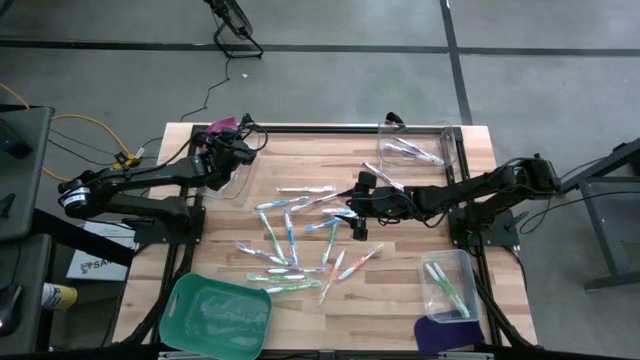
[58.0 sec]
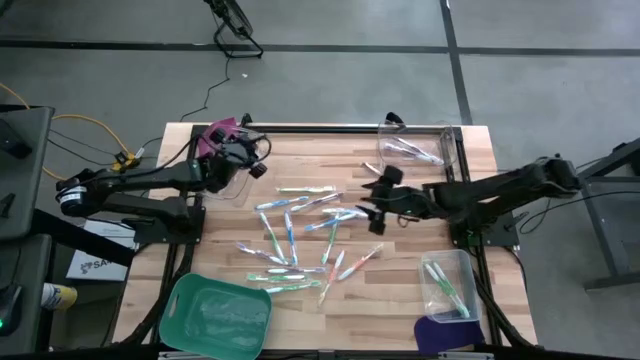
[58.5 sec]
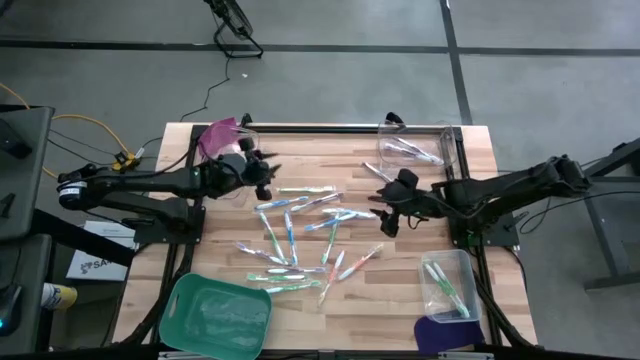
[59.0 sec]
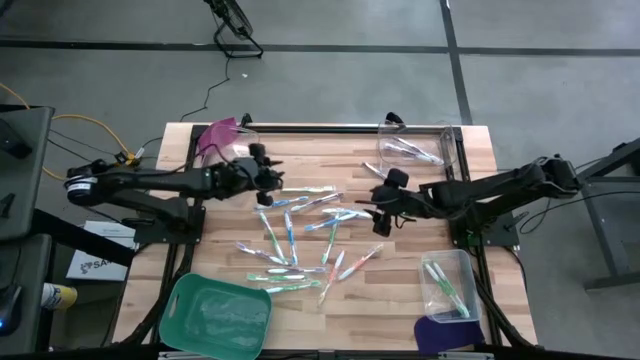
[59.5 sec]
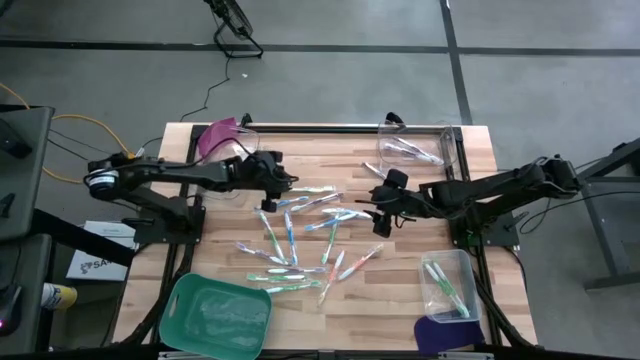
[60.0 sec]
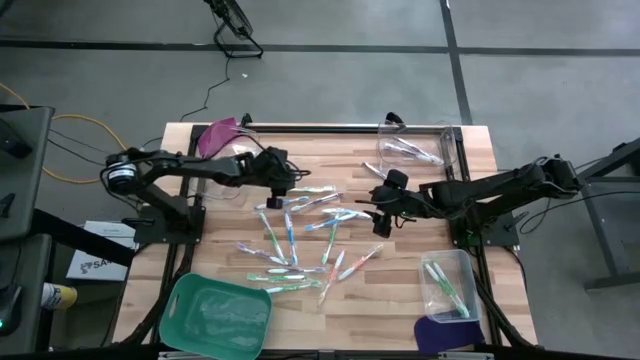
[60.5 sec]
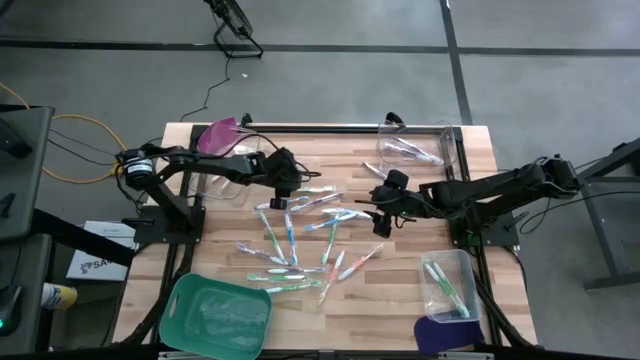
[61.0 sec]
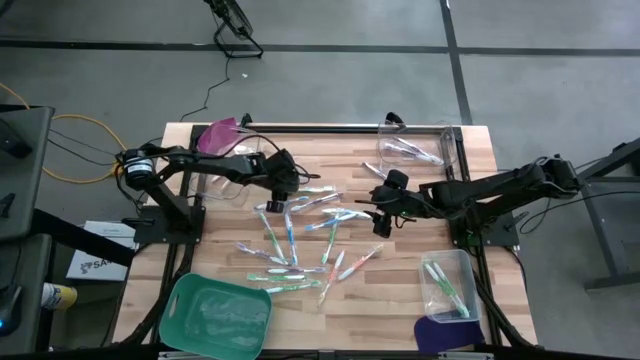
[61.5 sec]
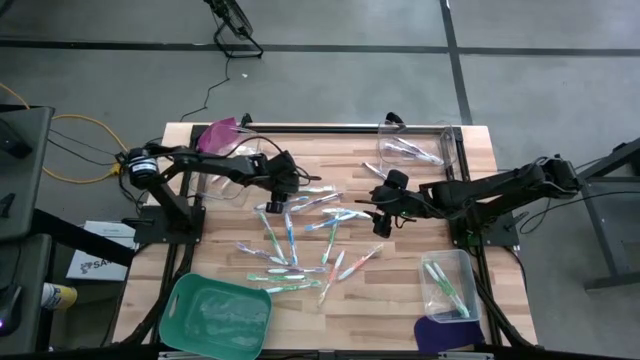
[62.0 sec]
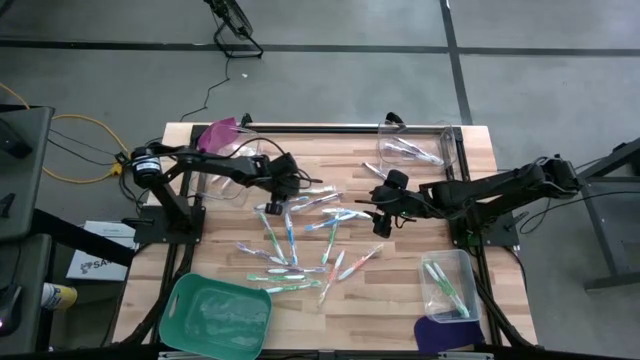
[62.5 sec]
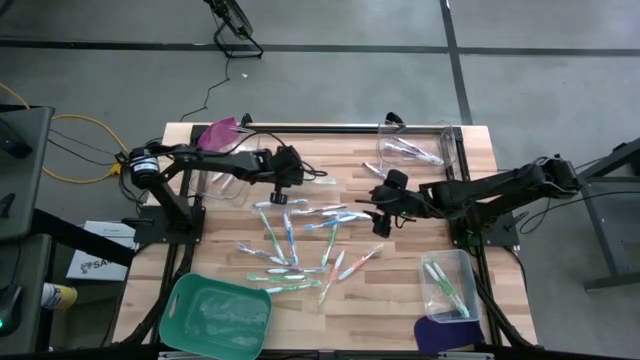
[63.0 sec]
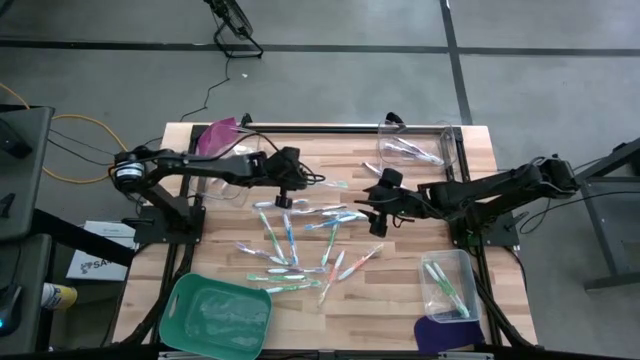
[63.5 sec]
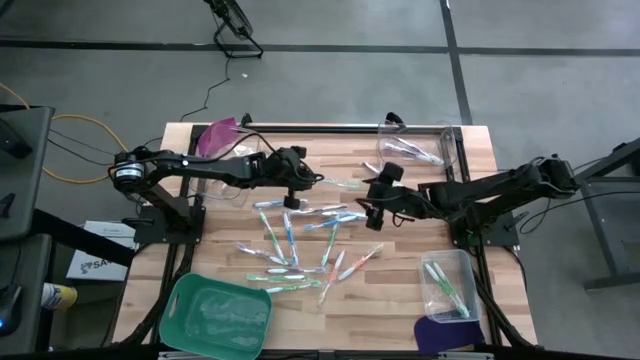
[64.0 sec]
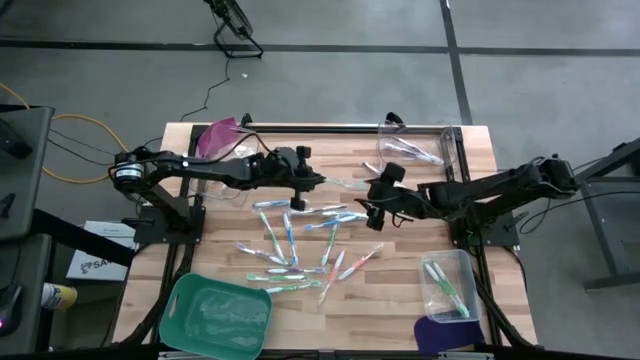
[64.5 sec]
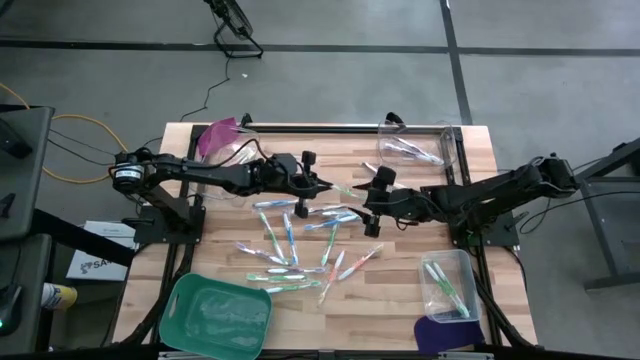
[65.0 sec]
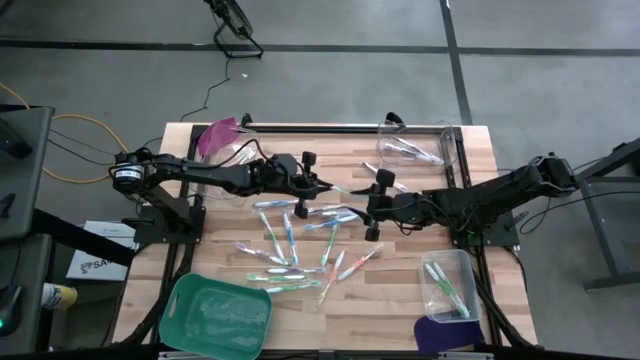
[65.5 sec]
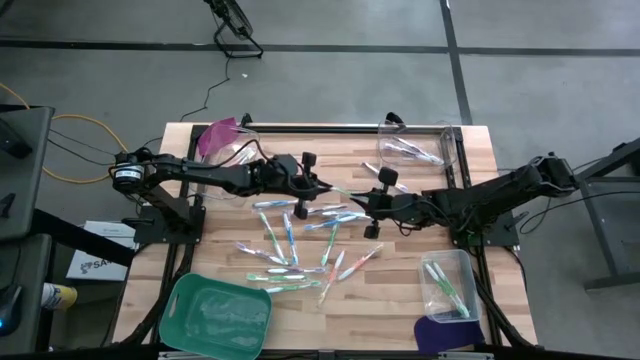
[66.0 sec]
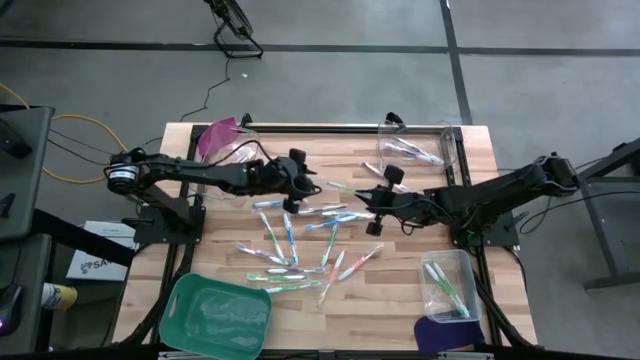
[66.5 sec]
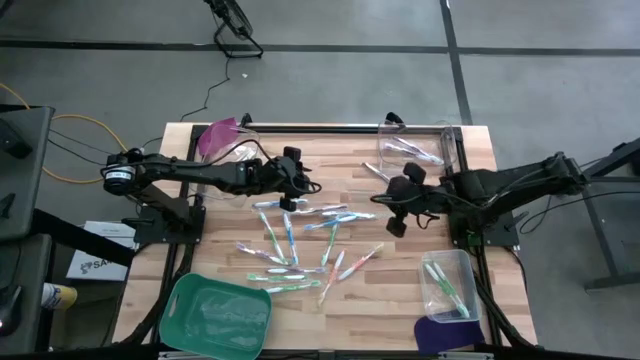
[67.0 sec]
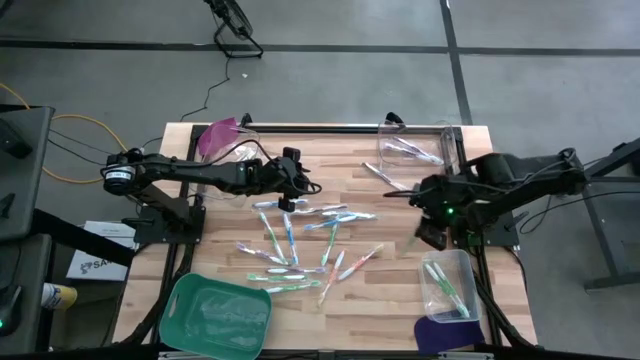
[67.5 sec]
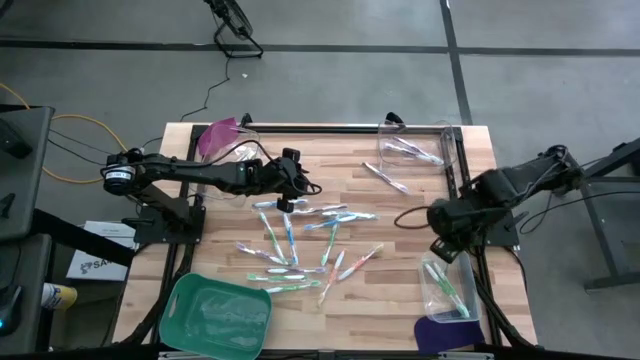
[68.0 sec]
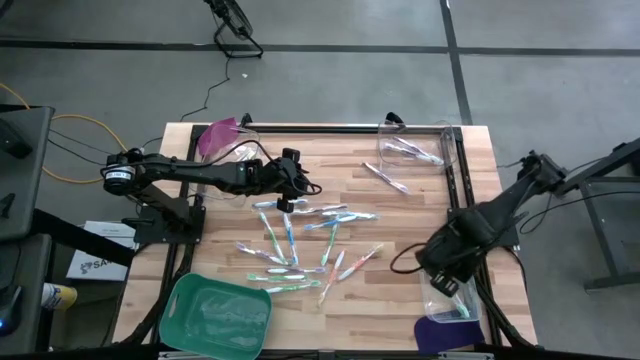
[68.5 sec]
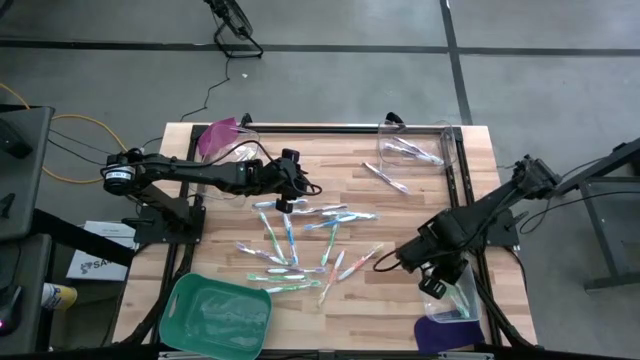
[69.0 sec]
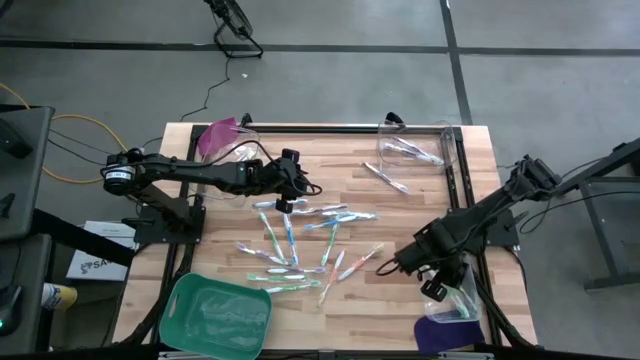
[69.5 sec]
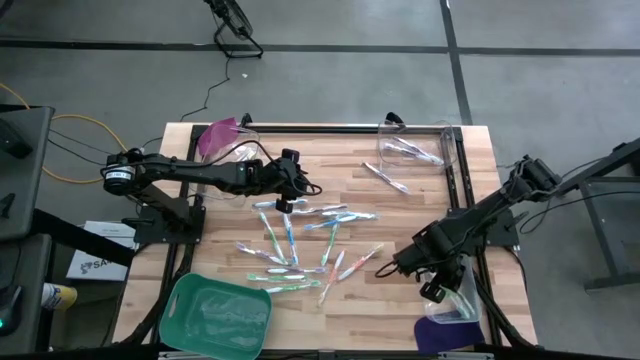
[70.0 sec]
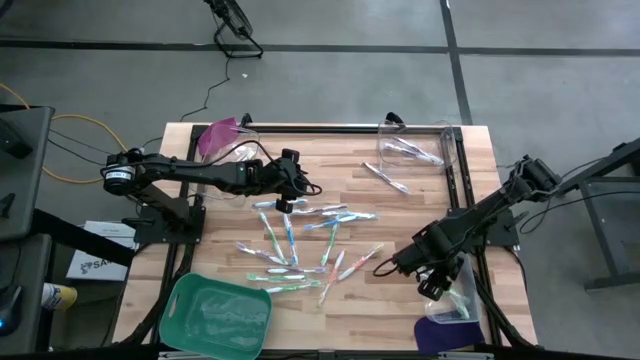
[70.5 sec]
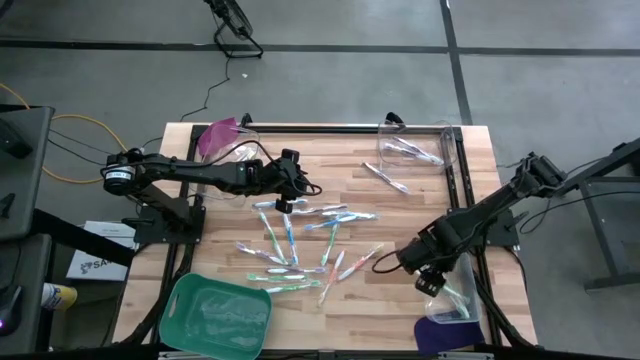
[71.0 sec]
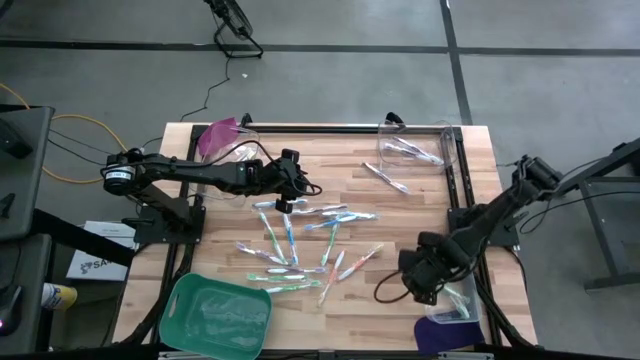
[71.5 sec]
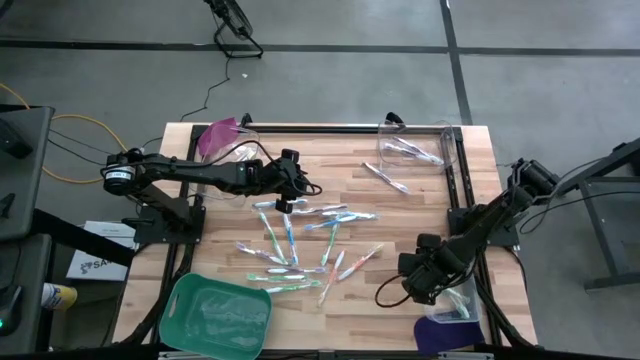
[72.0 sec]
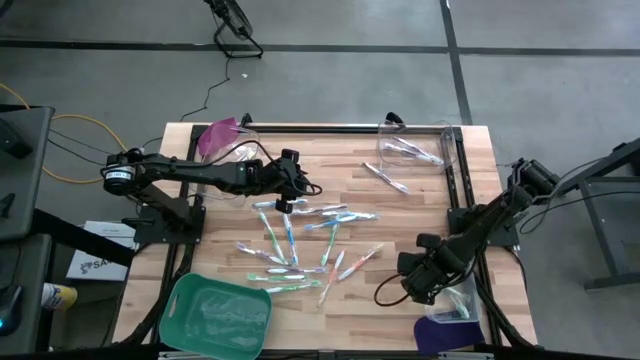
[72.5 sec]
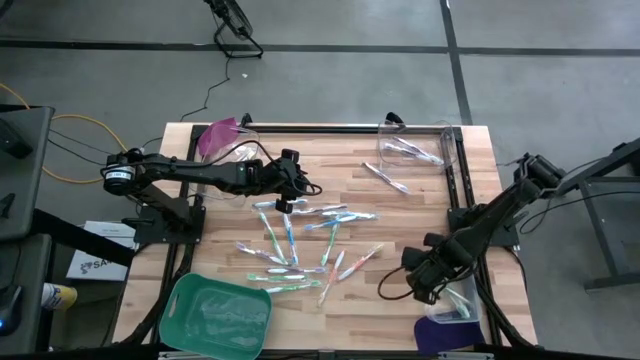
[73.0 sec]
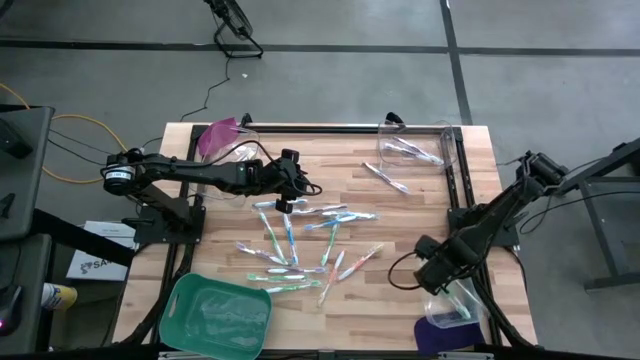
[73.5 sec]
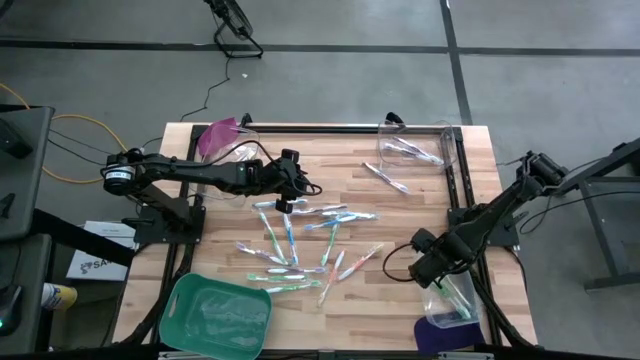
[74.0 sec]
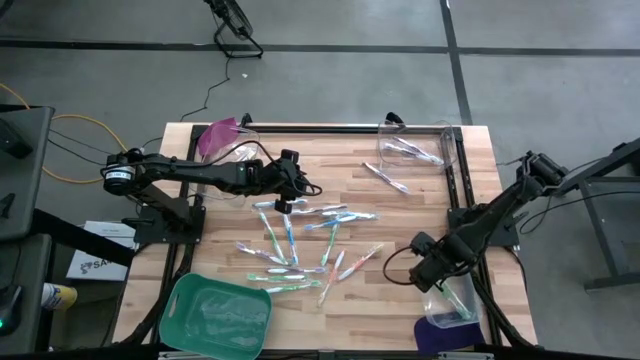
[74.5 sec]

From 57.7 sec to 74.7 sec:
Task: Pick & Place Toothbrushes
Put the green toothbrush into the white bin

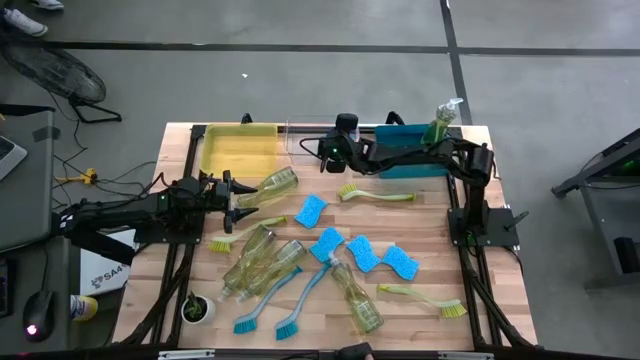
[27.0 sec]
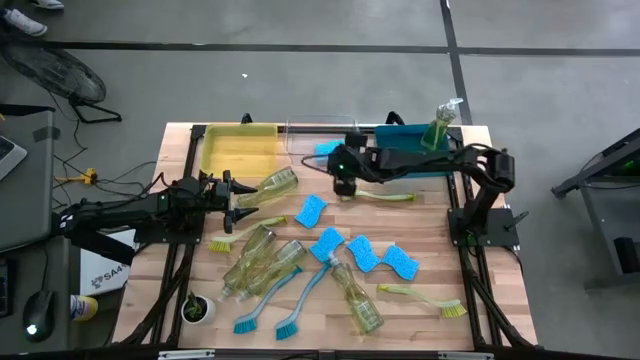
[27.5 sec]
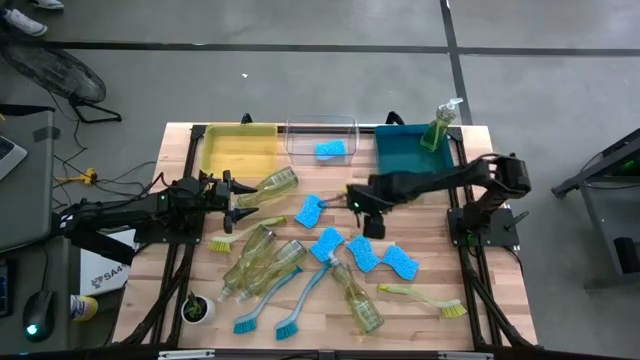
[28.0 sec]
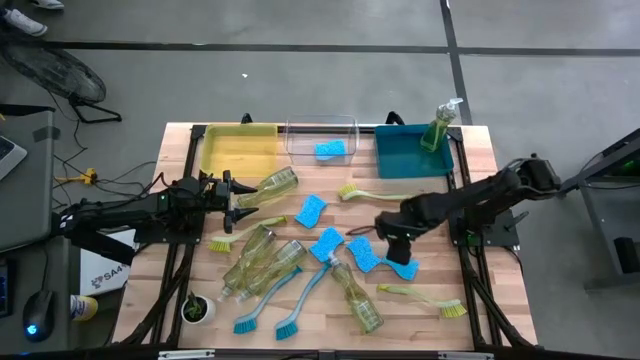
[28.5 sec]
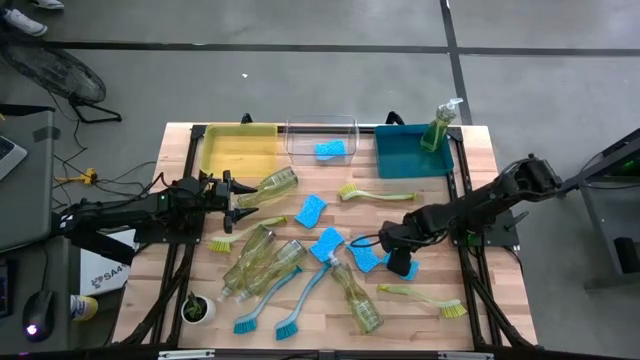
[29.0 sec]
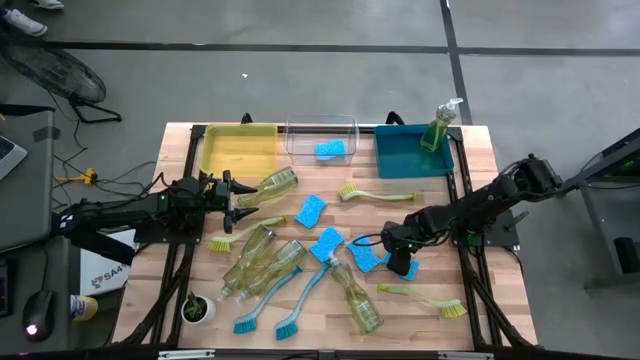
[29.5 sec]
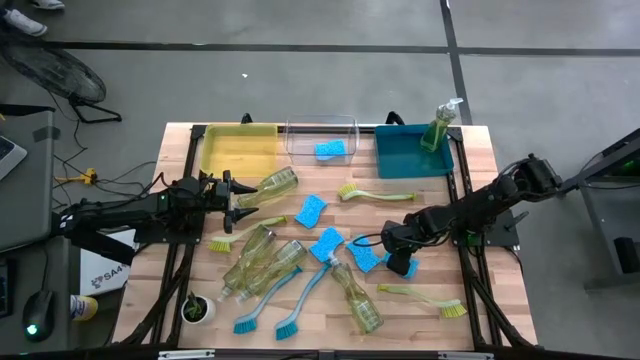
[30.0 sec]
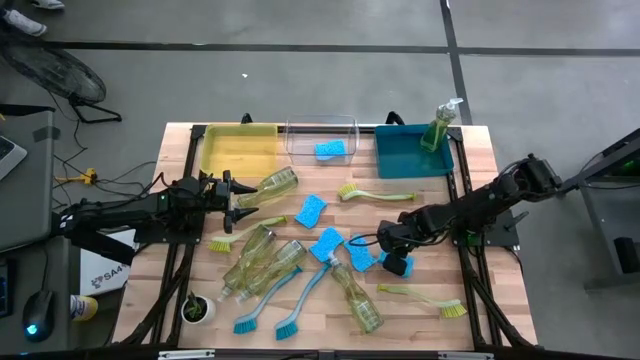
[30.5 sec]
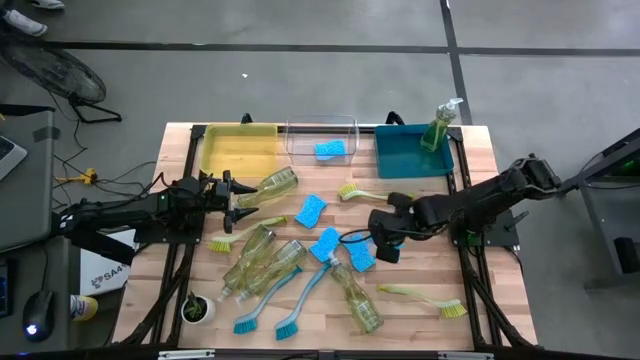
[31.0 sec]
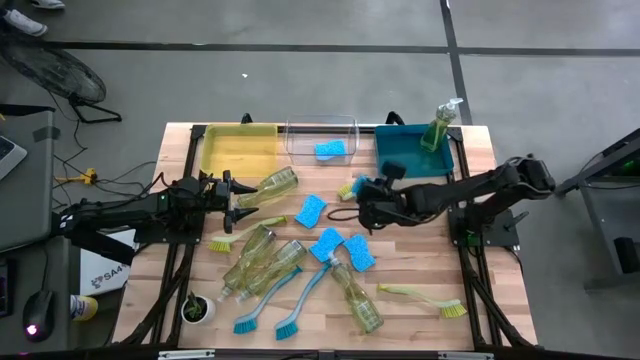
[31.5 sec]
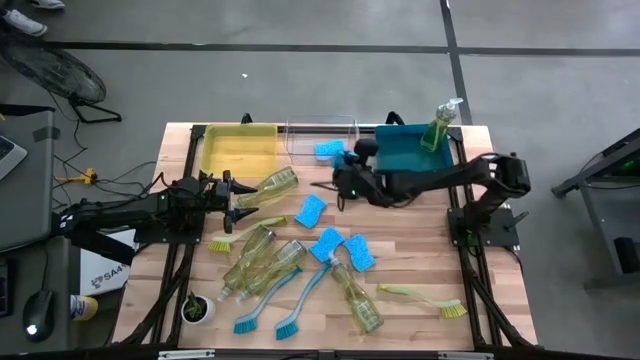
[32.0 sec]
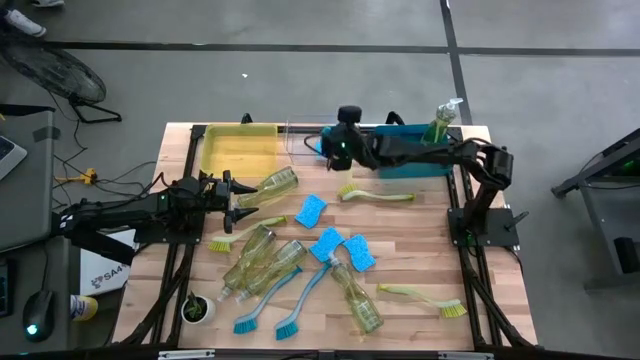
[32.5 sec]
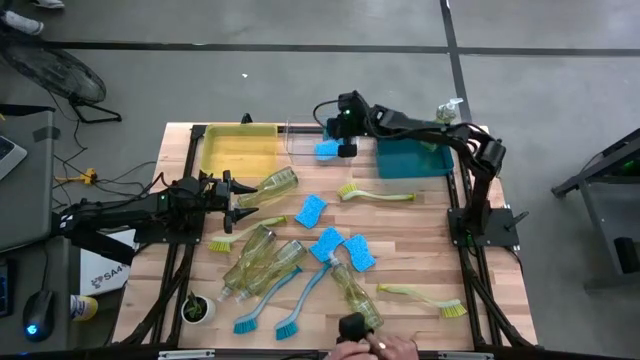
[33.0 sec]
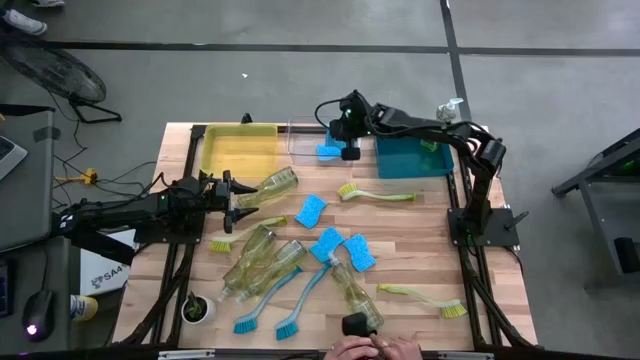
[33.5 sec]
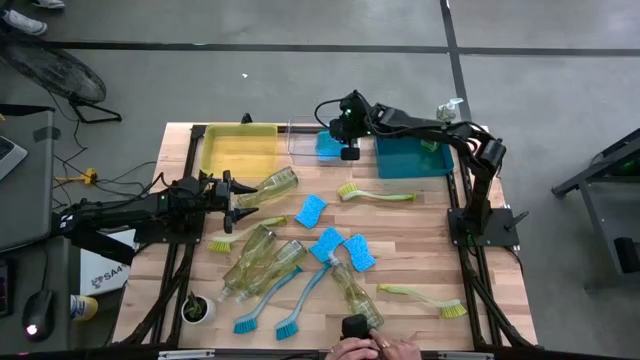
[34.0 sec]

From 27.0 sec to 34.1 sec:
Task: Pick & Place Kitchen Sink Supplies
Put the sponge into the transparent bin
